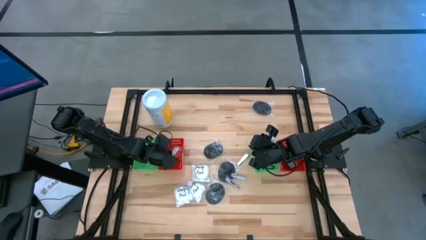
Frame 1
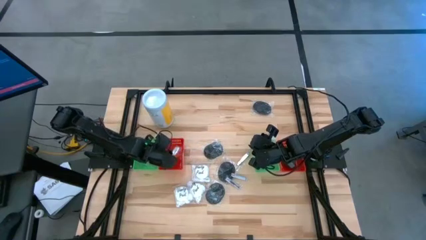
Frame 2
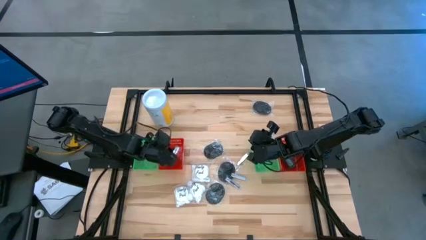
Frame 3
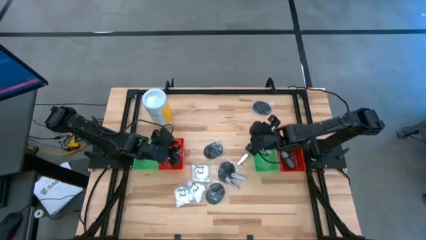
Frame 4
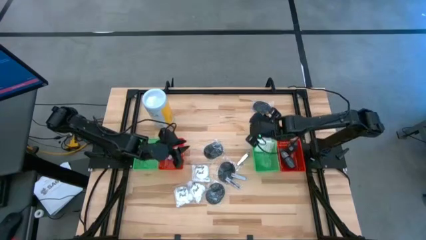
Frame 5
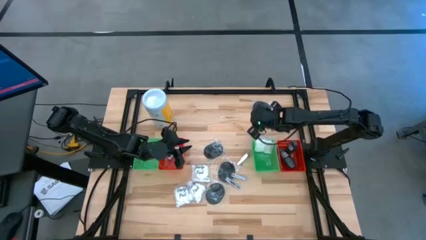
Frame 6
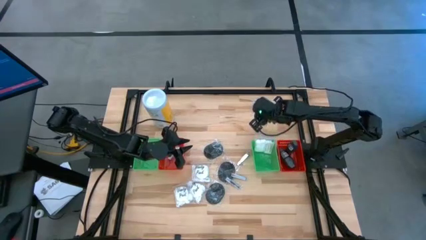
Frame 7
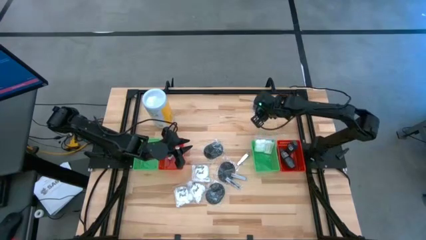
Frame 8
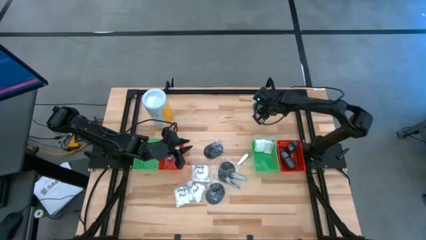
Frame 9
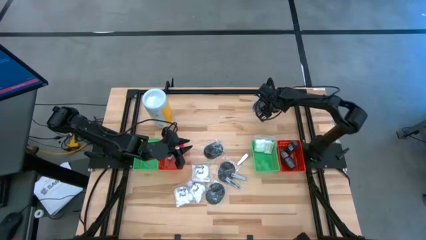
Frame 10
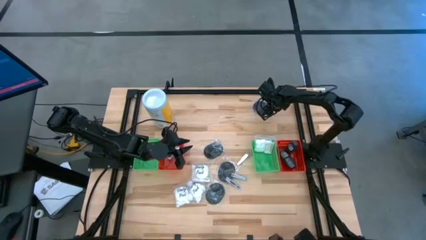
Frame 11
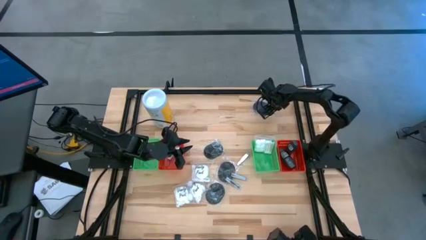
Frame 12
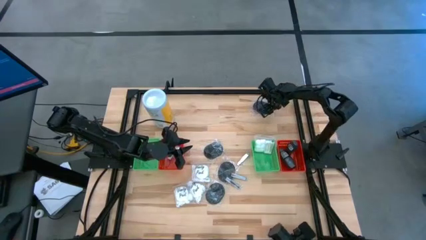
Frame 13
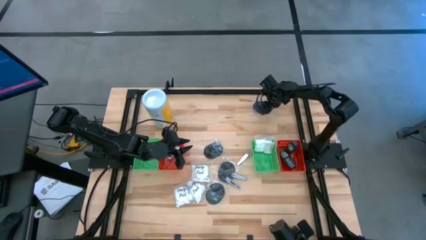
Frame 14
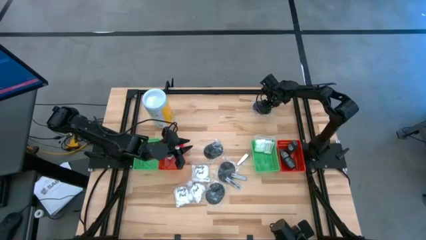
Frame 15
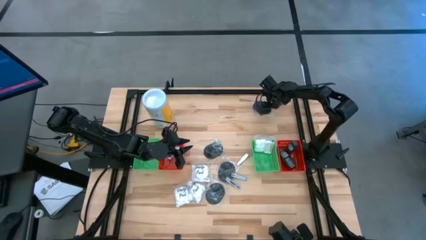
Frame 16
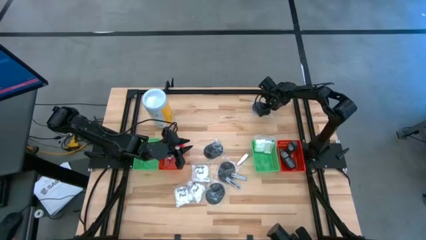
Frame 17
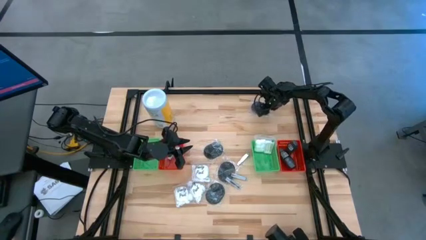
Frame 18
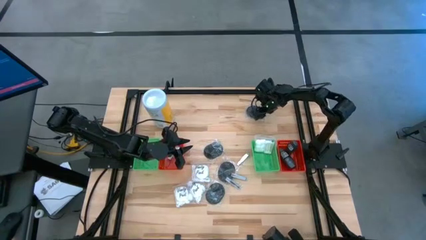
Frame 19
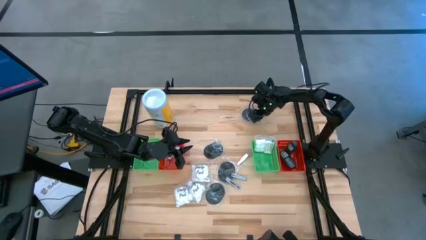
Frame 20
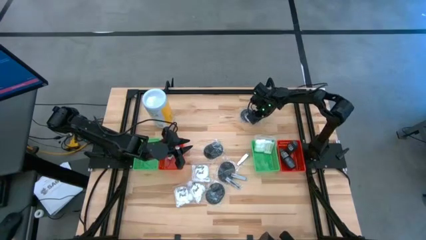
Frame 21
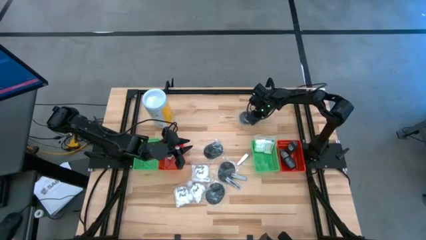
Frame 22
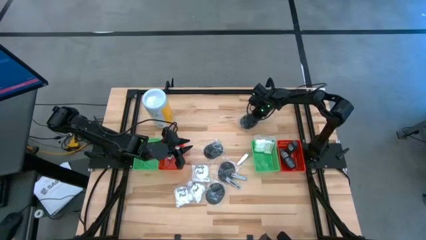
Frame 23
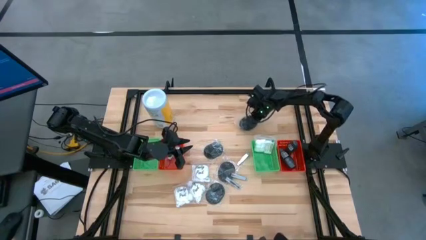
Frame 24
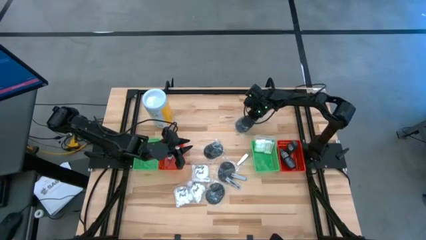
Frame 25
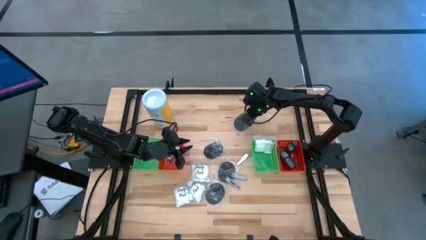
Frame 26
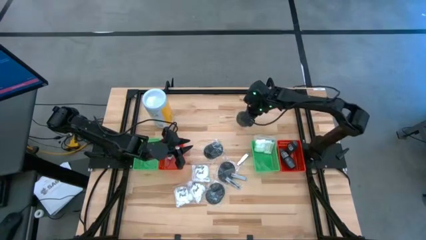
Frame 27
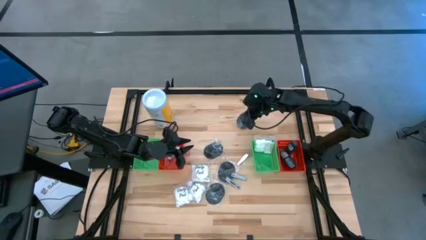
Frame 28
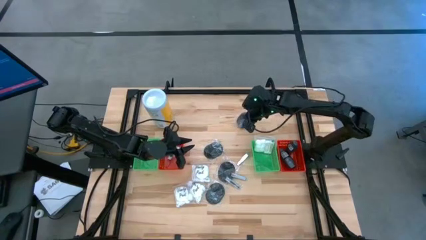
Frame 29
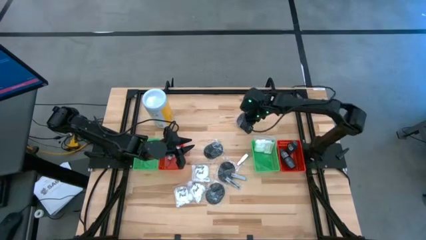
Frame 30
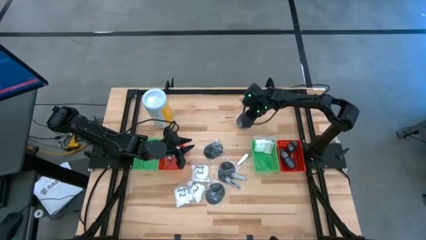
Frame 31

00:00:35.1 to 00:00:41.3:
Task: Pick & Place Travel size toiletries
Put the black hair brush into the left green bin

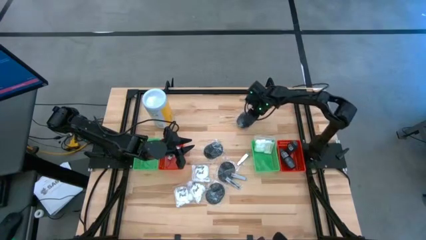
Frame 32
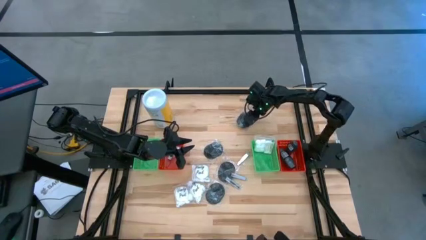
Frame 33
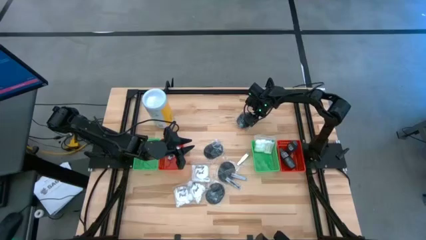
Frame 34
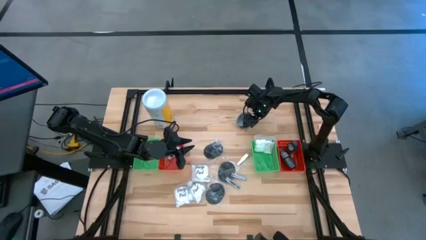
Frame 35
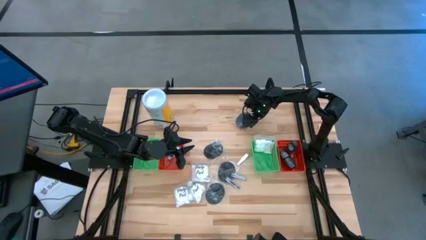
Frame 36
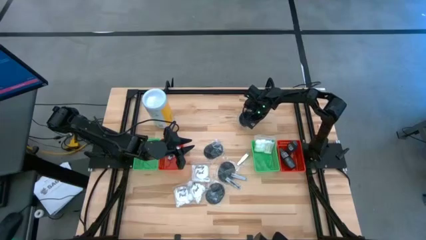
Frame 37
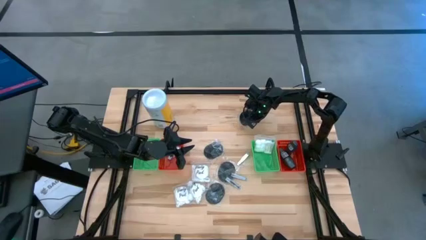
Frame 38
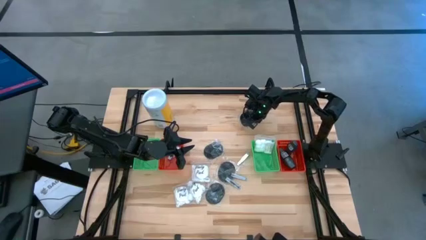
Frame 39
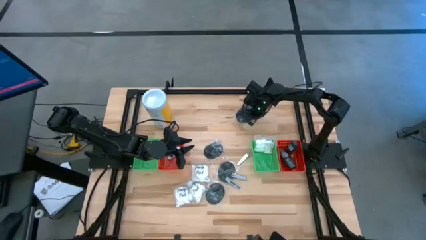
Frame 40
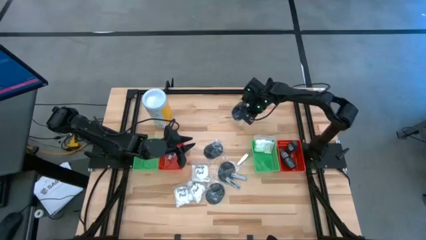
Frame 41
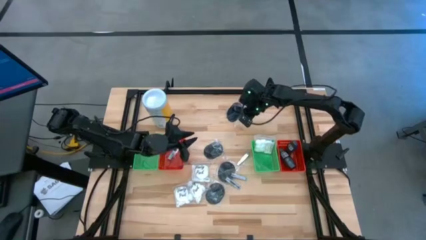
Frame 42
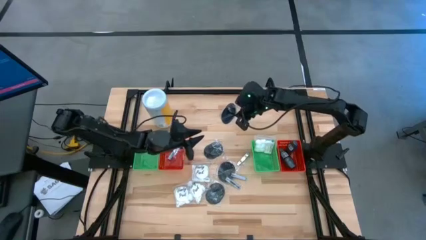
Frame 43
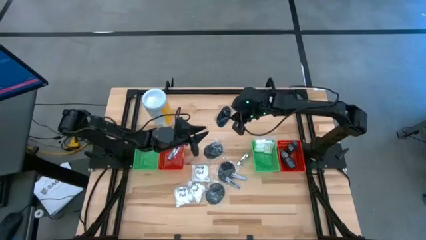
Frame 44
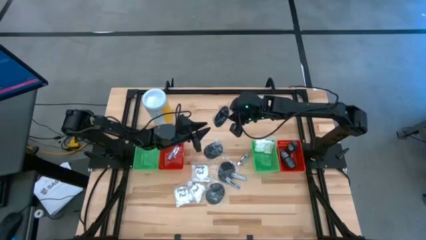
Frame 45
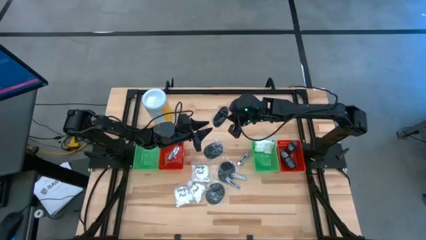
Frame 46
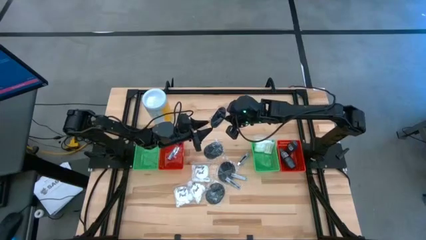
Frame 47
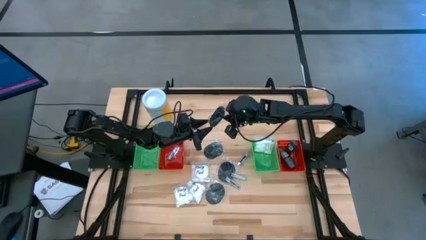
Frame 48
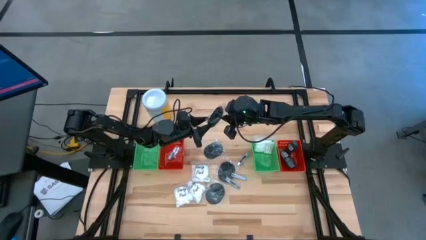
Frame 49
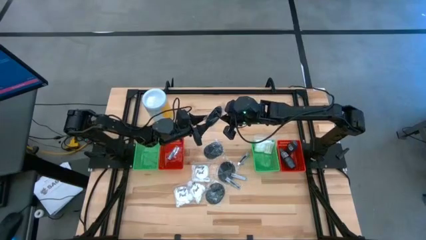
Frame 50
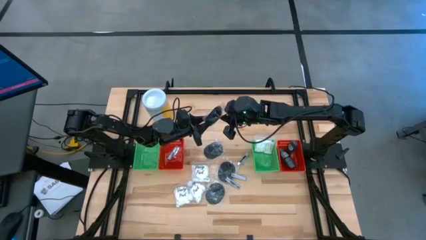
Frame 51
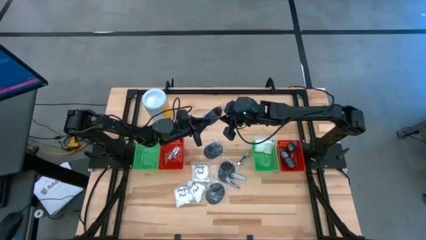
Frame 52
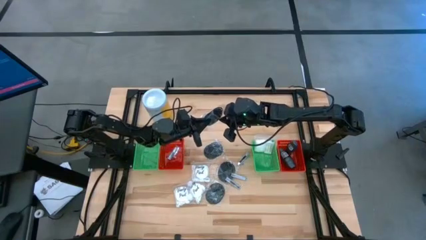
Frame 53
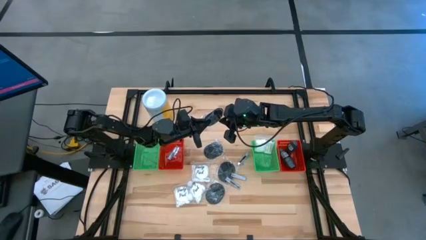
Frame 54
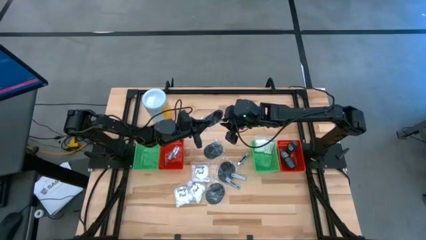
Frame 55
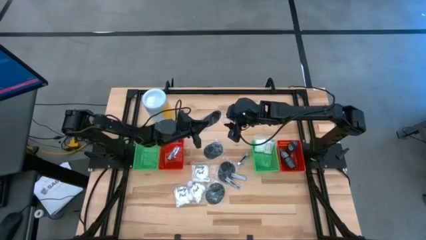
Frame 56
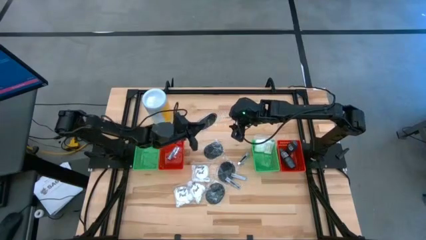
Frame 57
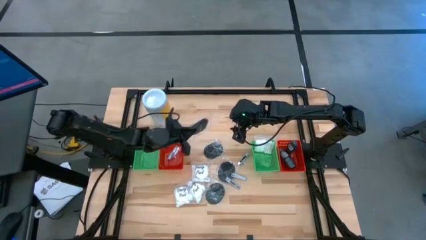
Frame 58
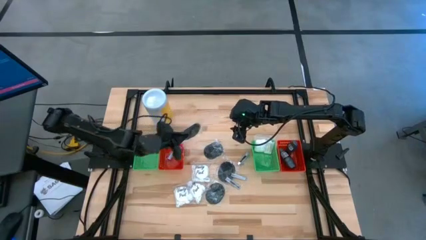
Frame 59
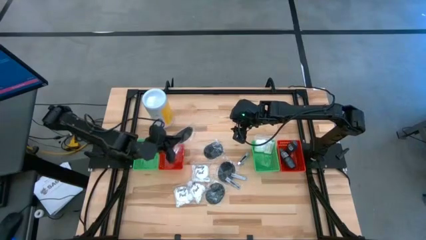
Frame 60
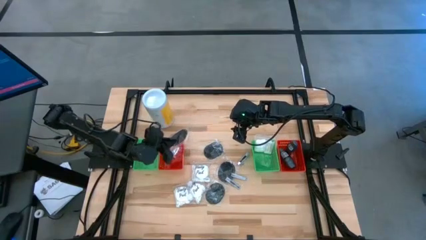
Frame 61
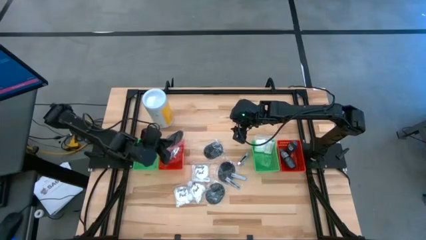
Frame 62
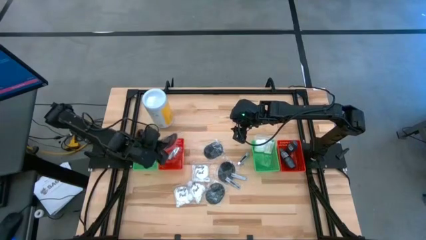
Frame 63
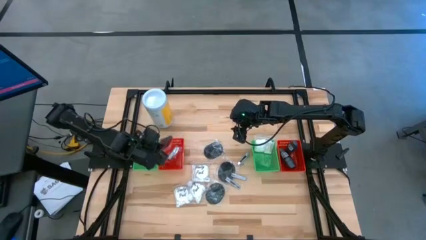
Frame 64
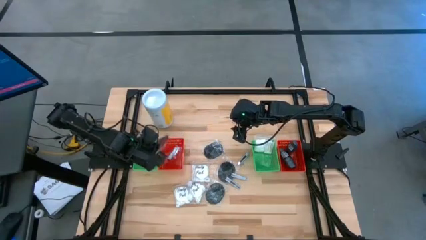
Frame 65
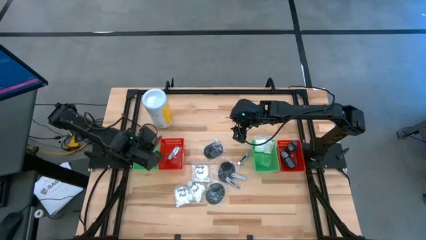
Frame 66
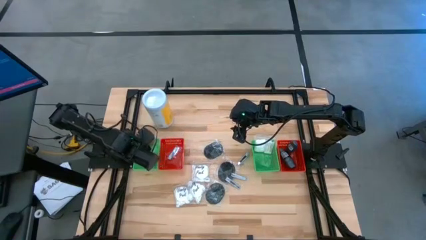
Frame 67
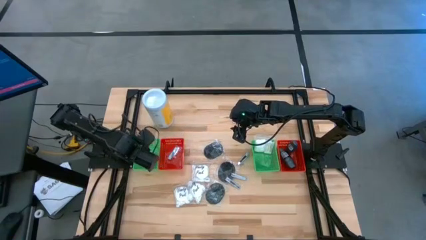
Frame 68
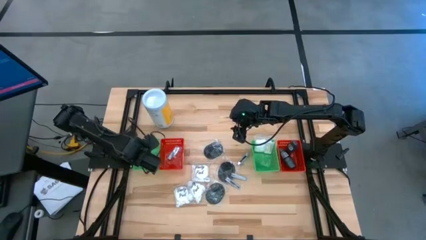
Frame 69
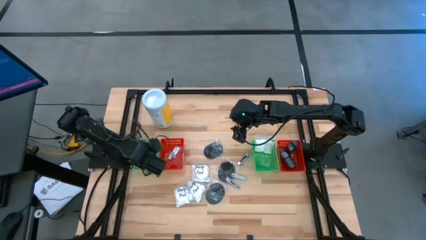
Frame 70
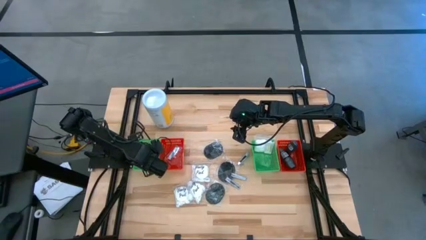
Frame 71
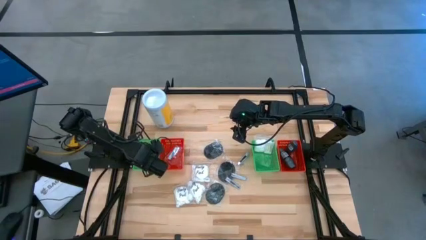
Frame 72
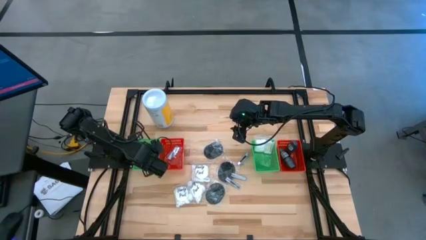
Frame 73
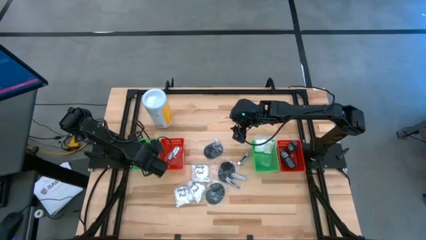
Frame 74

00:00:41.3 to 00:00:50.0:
Put the black hair brush into the left green bin
